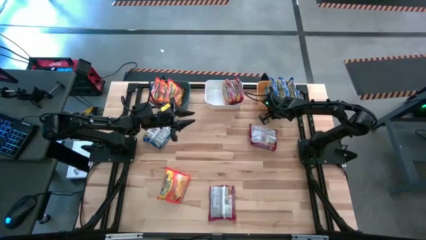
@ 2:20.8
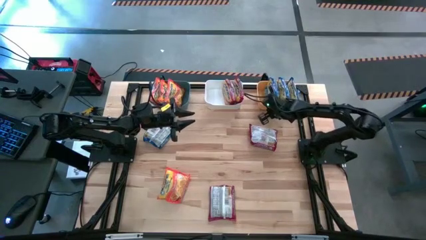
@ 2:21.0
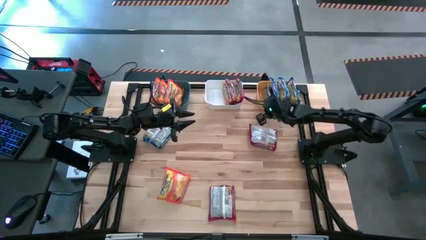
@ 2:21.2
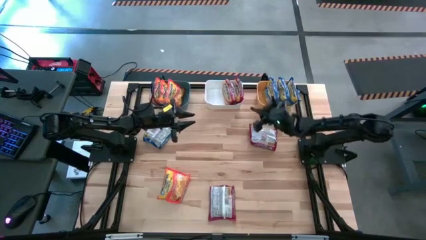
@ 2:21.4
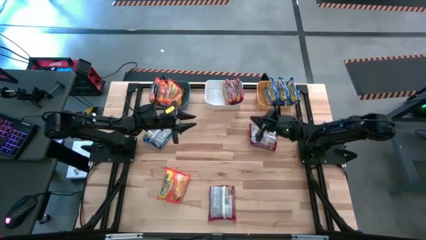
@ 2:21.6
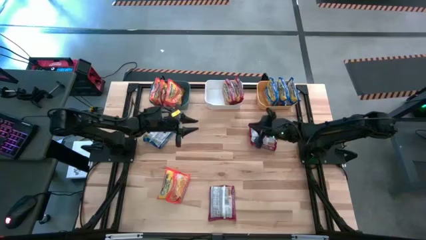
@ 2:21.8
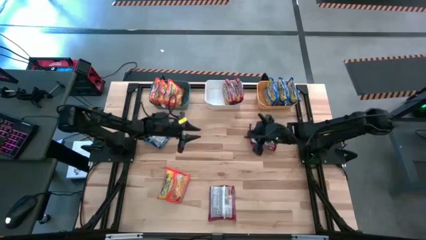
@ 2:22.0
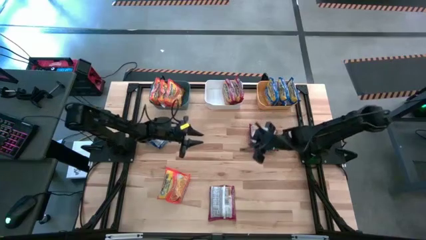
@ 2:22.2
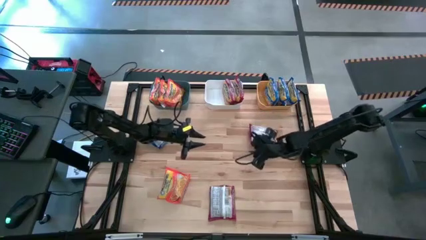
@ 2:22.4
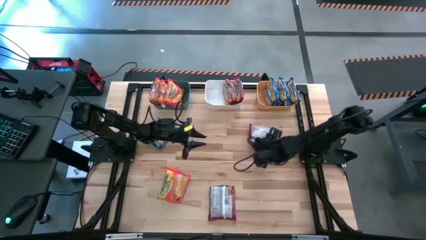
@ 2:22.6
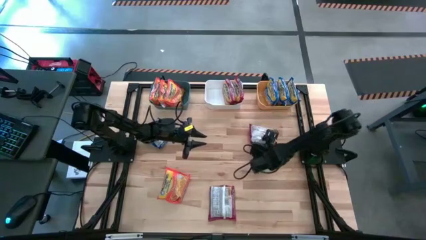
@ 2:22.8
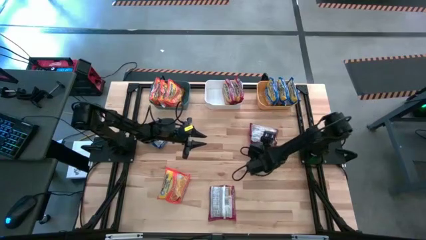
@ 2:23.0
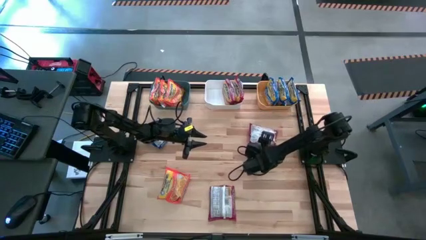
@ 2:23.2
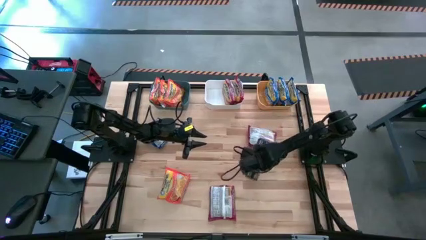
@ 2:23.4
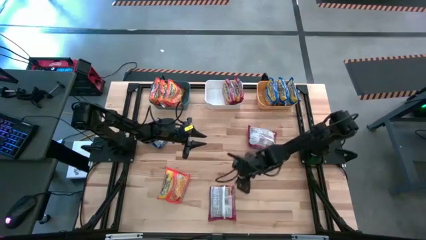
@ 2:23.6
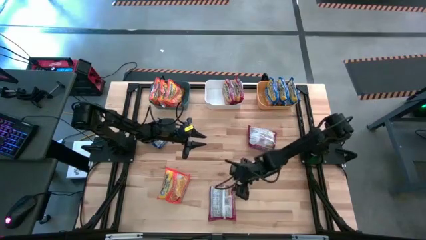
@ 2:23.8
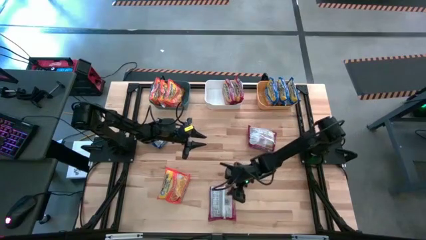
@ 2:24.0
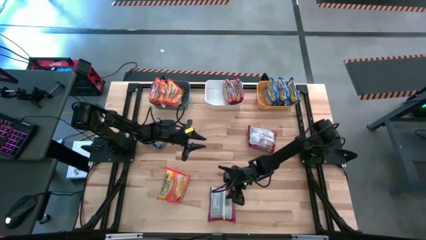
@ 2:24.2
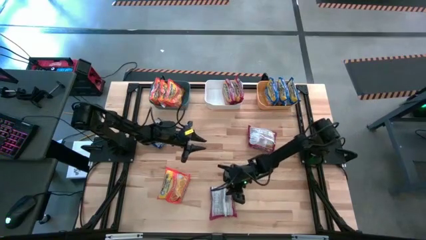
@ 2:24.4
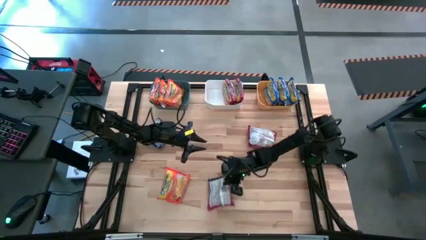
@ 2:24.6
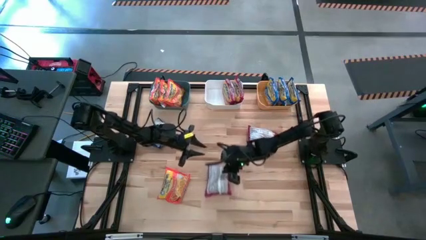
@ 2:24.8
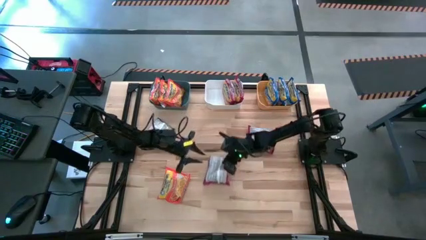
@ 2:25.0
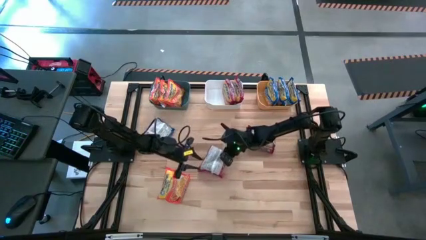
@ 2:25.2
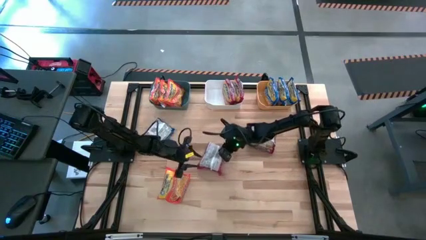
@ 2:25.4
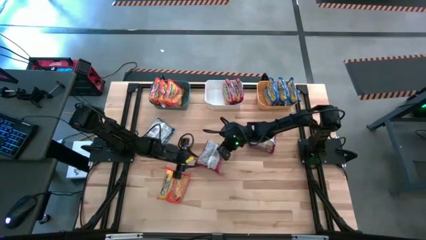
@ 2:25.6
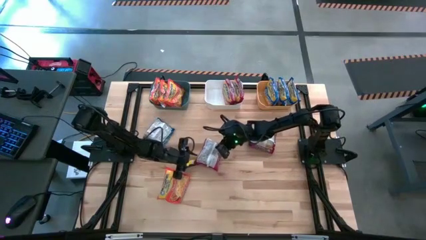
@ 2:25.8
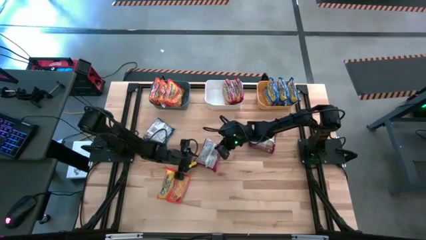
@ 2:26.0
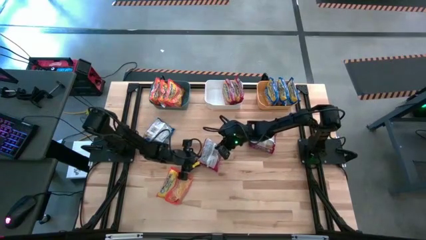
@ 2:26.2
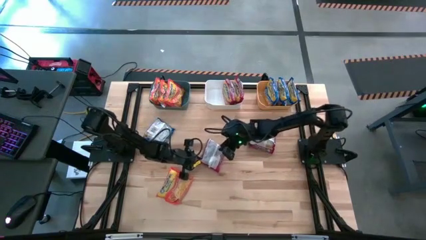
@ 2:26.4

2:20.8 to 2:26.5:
Task: Sort Maruchan noodles
Put the bottom red noodle pack into the white bin

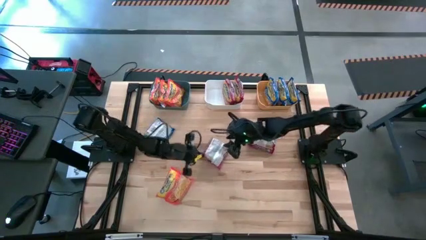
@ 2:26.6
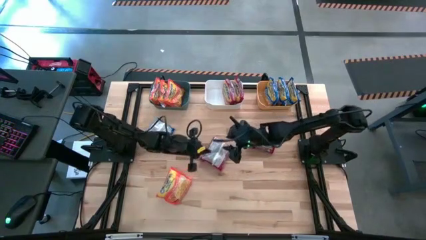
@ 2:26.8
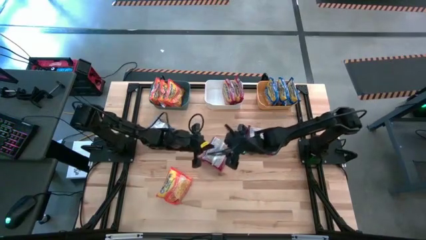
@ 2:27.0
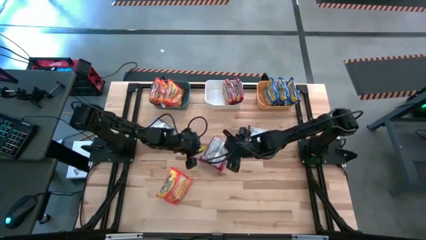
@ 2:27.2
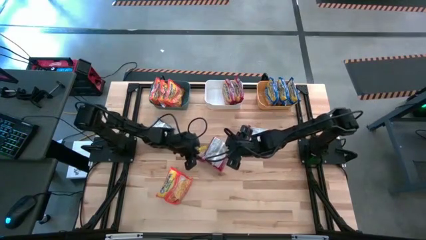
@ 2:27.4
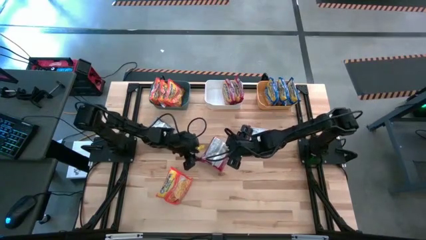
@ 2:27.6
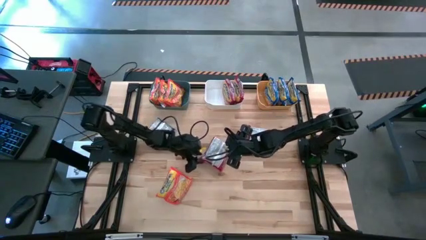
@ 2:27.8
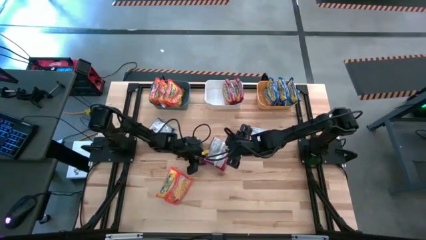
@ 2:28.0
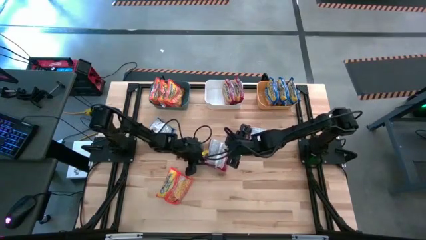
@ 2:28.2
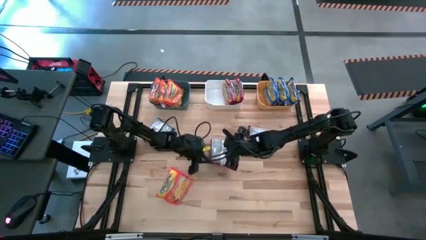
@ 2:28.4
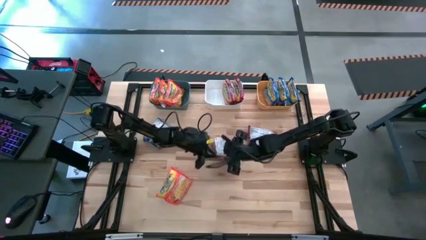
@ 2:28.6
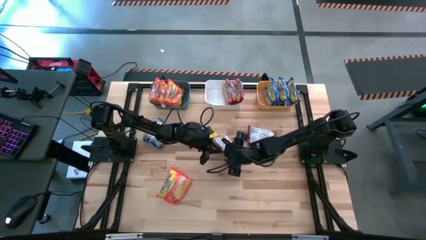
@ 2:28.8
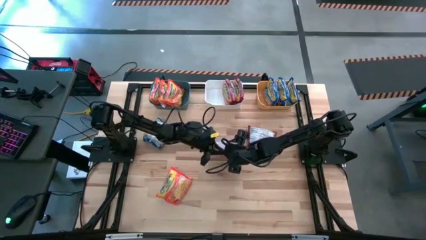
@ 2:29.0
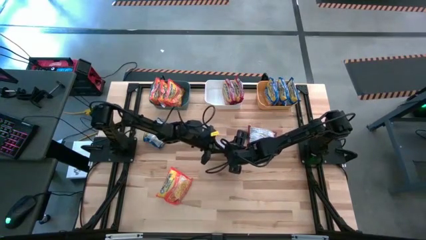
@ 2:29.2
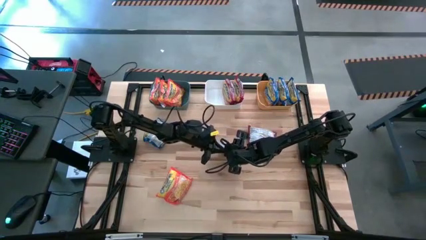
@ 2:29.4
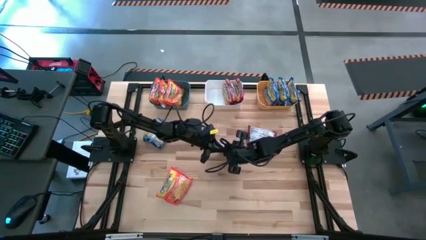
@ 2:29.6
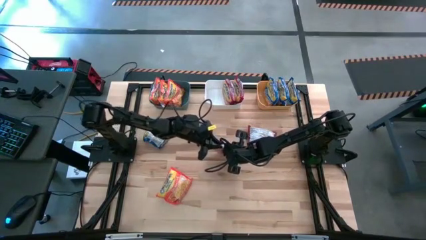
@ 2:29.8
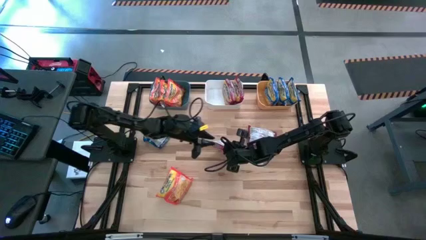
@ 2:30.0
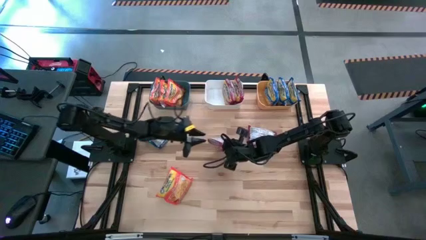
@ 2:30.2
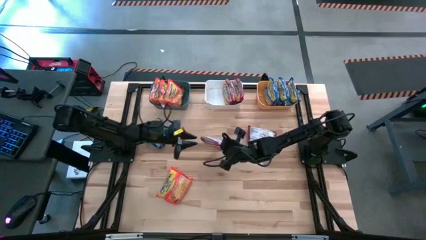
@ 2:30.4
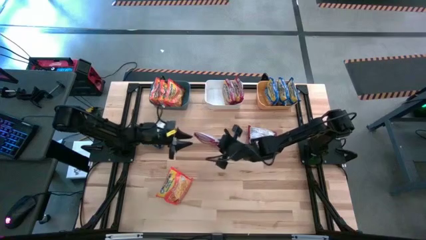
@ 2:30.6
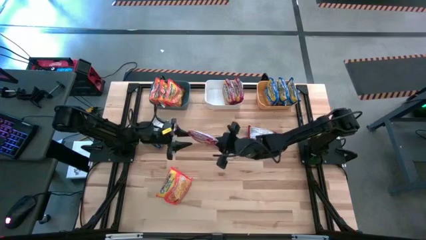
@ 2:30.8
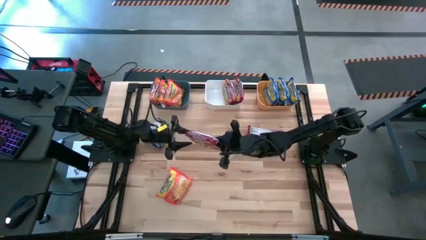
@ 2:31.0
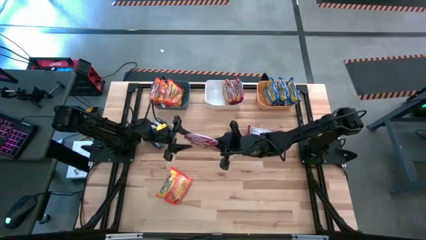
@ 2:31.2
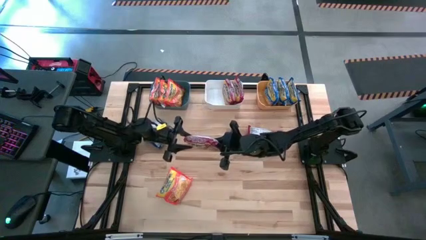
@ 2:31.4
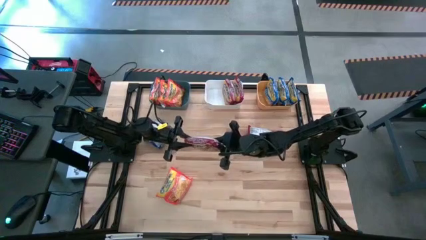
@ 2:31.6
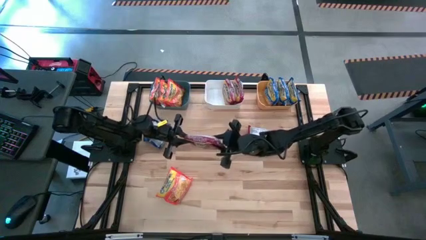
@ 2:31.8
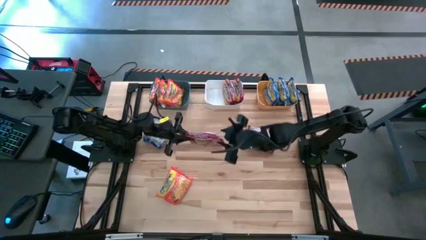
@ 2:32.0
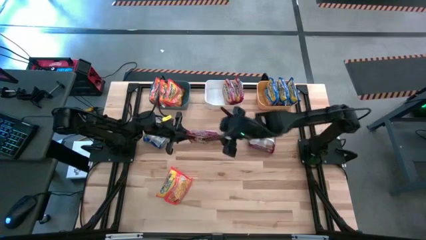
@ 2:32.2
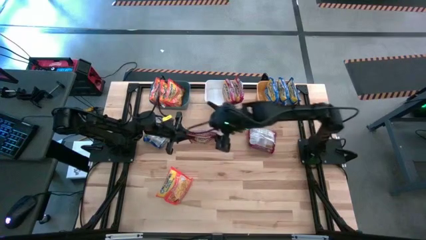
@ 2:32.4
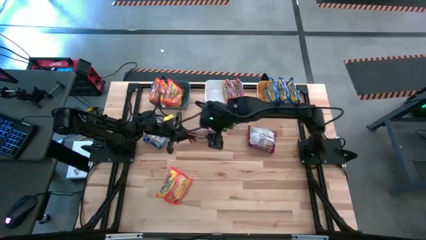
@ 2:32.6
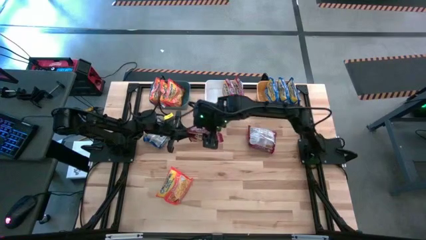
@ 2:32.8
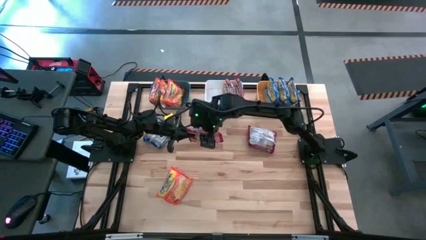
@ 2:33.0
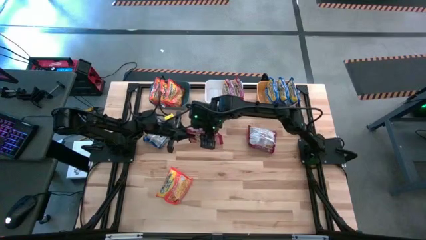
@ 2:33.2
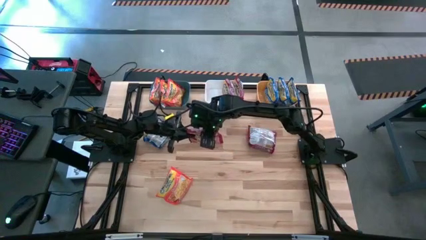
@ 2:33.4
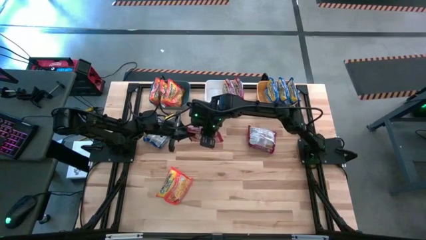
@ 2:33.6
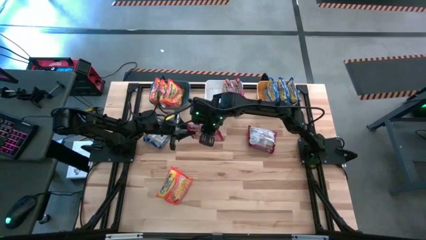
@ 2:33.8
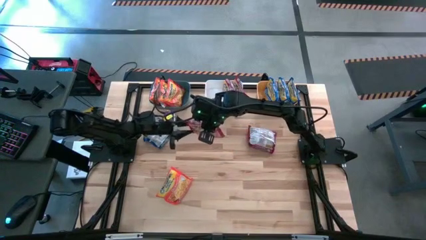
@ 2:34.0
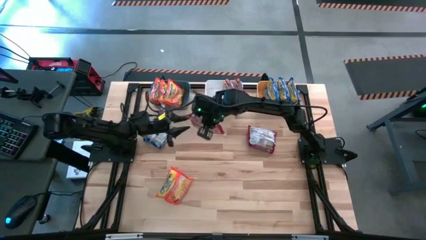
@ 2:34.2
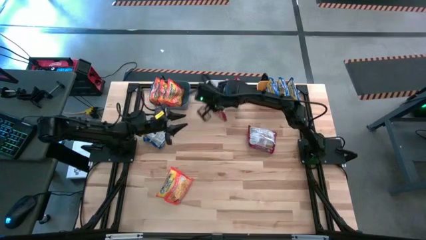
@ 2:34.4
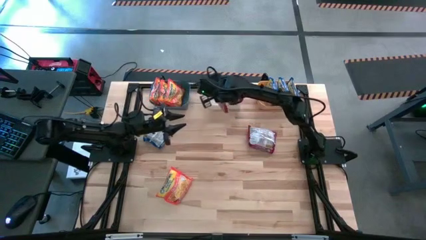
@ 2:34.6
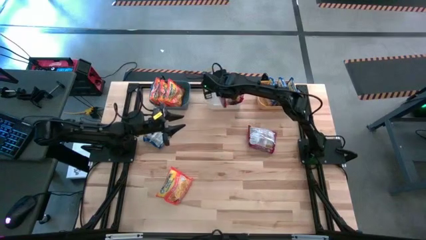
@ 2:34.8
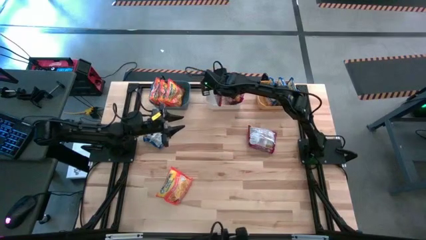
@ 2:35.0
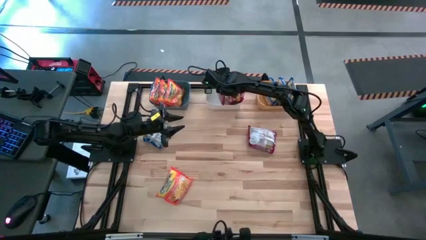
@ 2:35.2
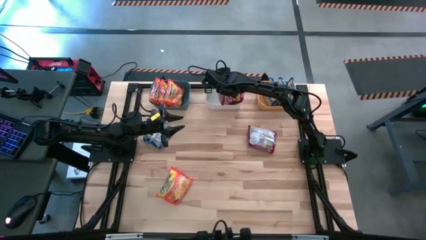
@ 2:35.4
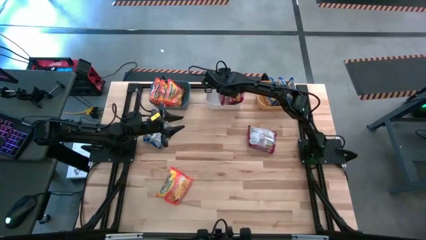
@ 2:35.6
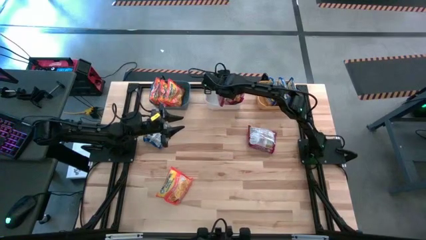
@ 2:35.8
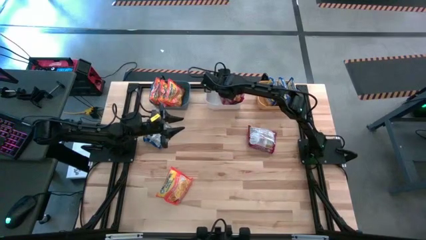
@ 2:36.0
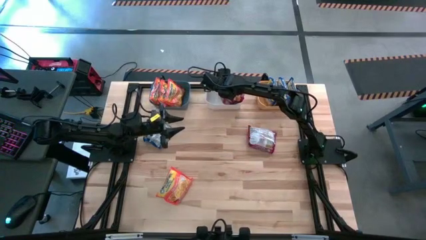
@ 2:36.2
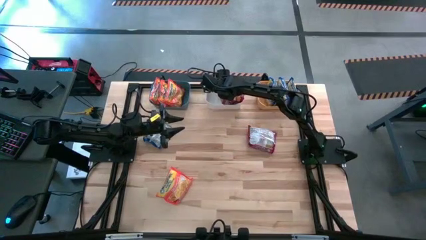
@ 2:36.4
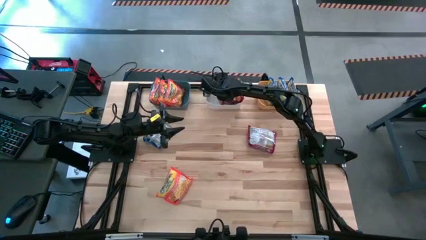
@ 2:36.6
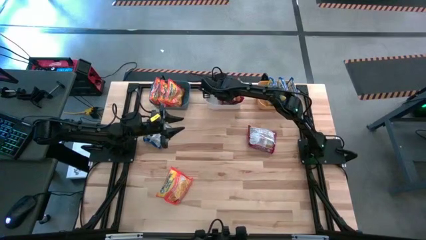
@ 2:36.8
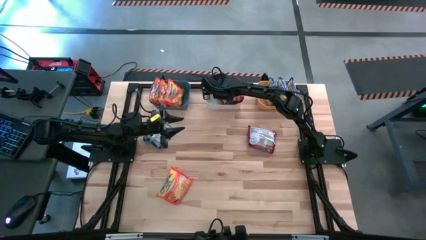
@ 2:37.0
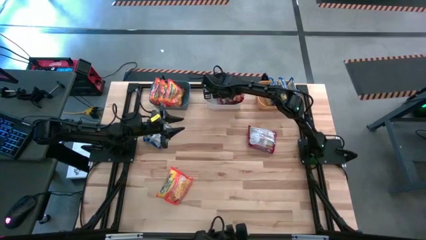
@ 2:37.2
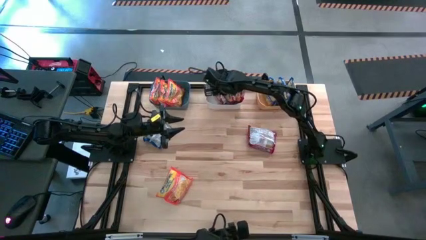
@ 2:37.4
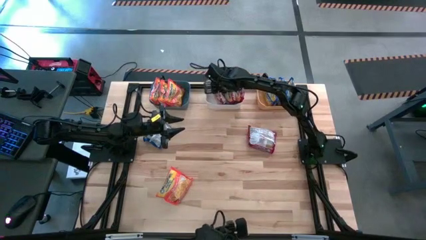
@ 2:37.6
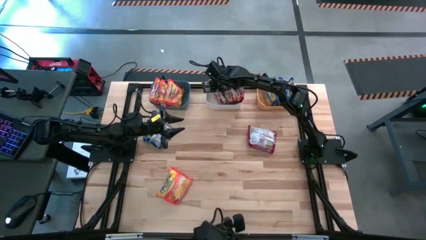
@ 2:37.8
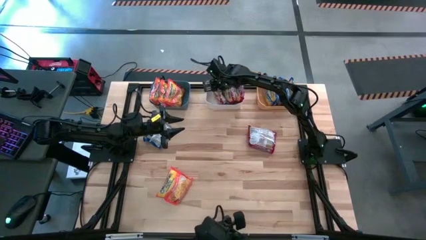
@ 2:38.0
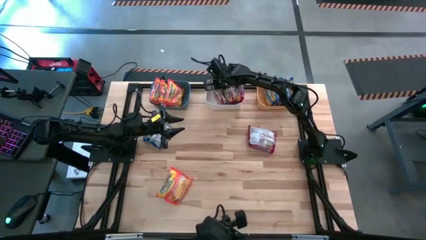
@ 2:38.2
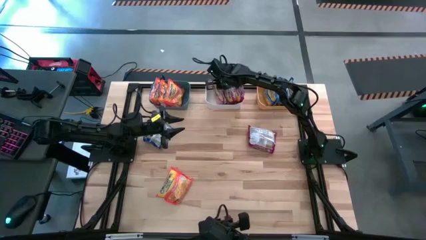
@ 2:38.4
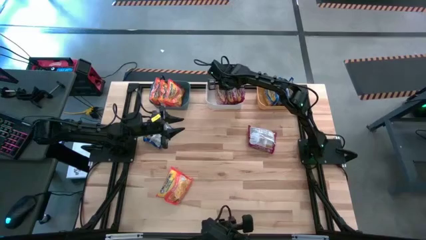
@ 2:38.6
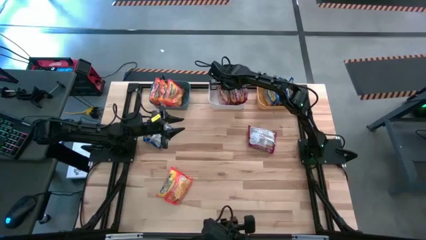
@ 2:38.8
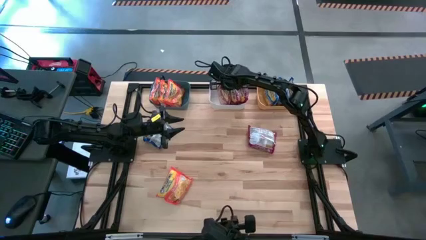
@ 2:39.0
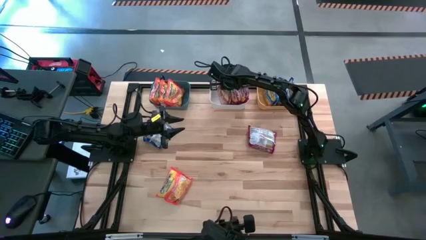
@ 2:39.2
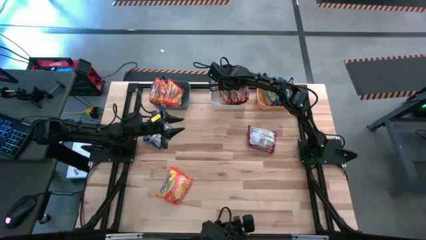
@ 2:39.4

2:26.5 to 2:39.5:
Put the red noodle pack into the white bin
